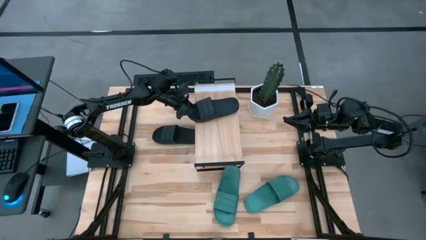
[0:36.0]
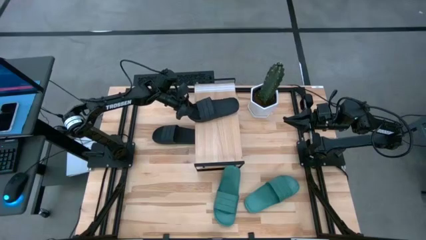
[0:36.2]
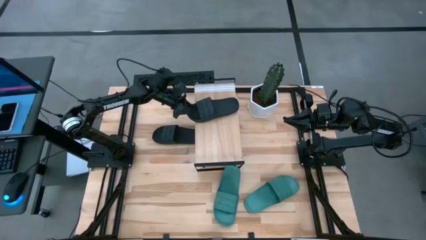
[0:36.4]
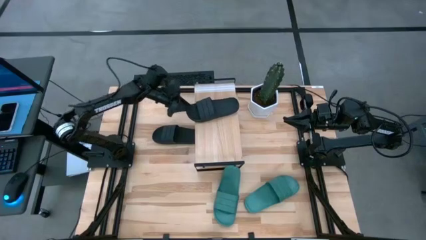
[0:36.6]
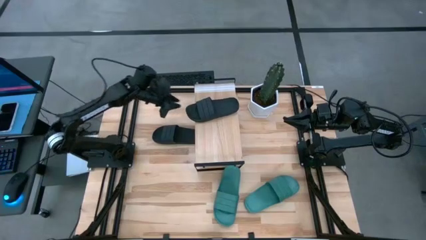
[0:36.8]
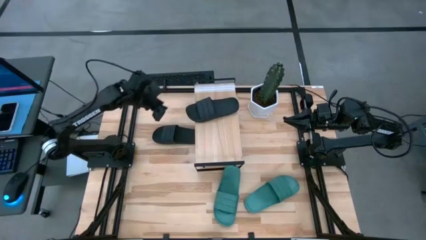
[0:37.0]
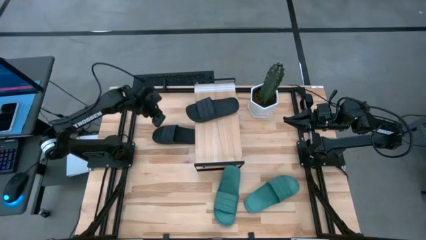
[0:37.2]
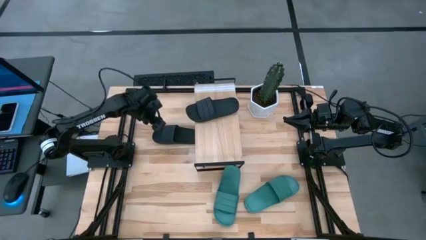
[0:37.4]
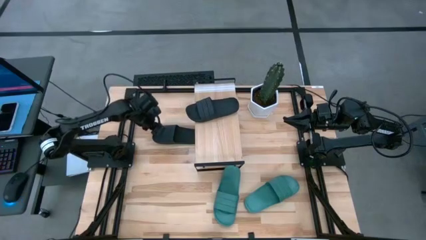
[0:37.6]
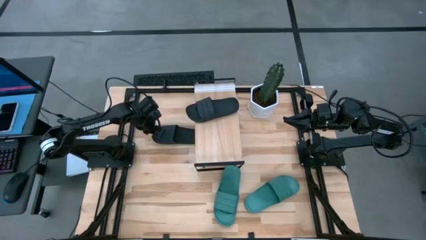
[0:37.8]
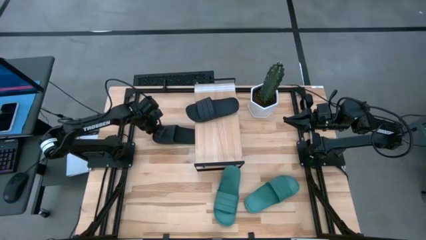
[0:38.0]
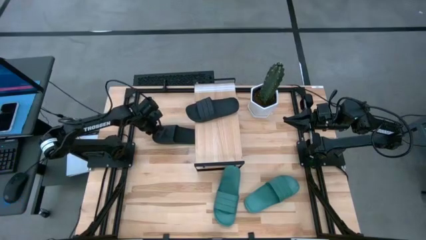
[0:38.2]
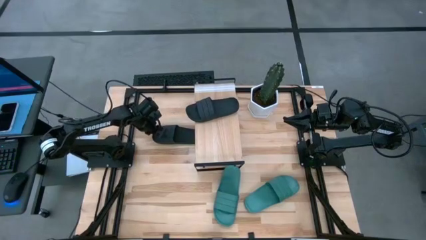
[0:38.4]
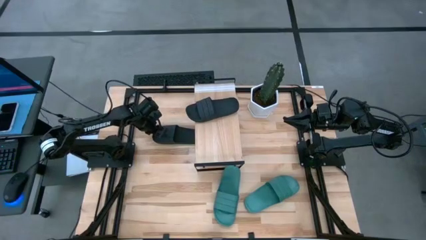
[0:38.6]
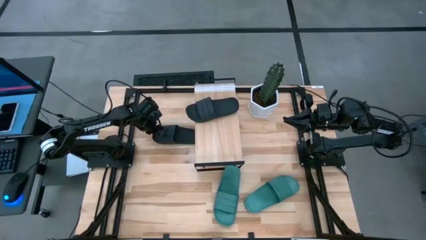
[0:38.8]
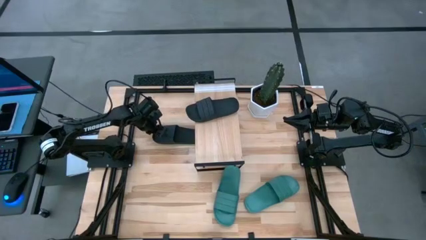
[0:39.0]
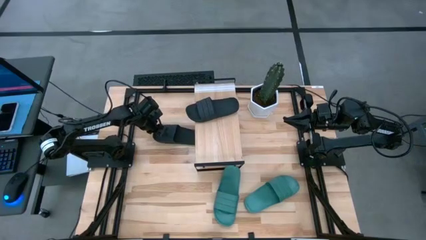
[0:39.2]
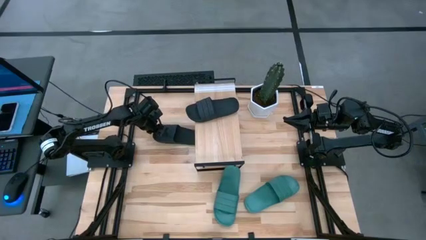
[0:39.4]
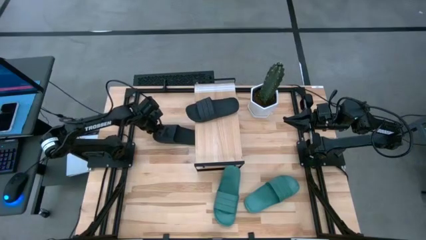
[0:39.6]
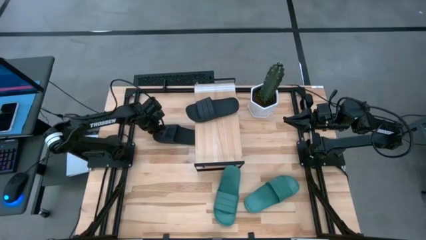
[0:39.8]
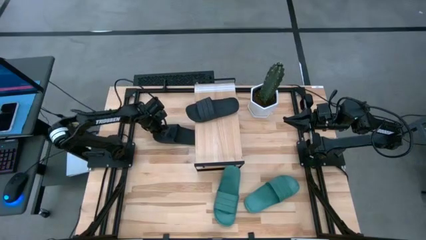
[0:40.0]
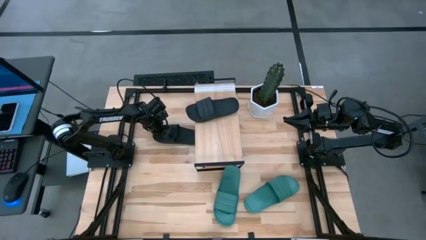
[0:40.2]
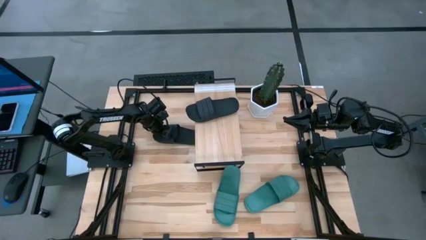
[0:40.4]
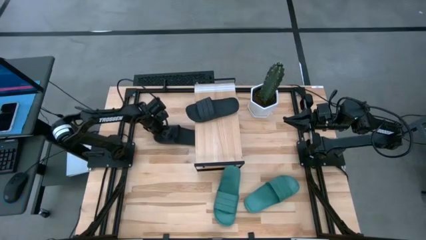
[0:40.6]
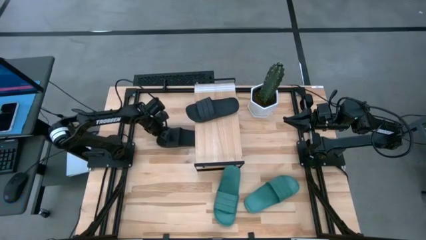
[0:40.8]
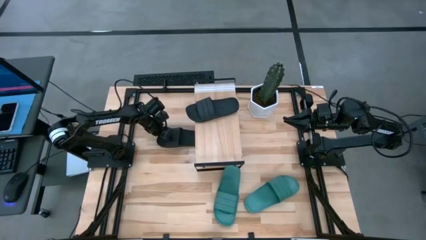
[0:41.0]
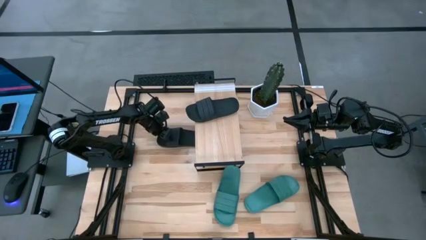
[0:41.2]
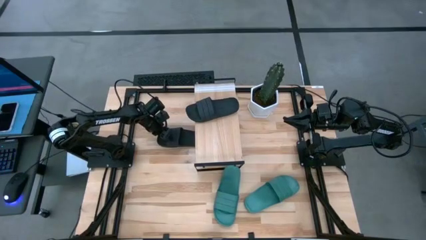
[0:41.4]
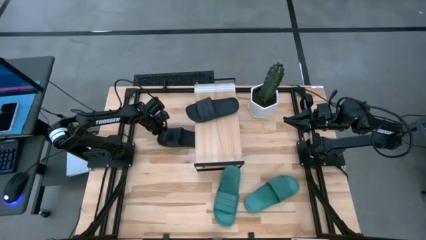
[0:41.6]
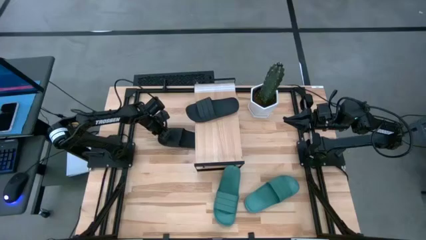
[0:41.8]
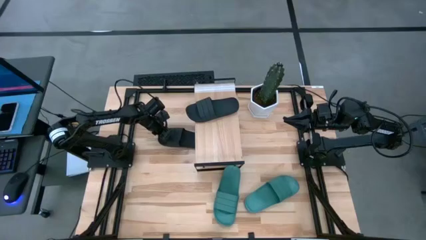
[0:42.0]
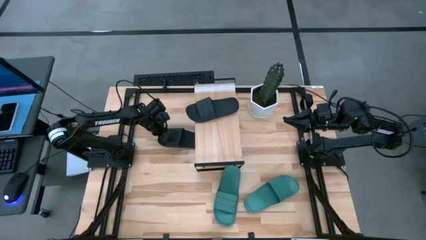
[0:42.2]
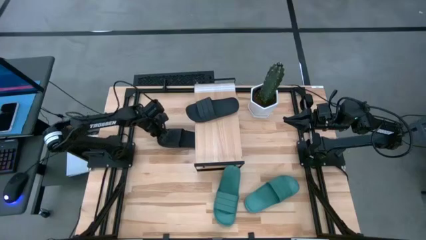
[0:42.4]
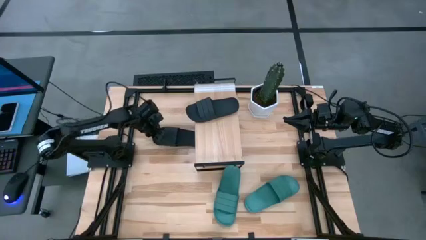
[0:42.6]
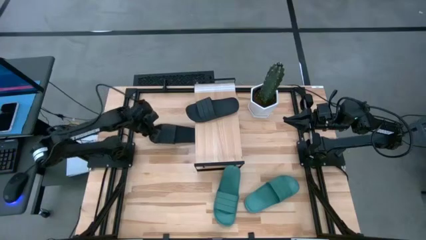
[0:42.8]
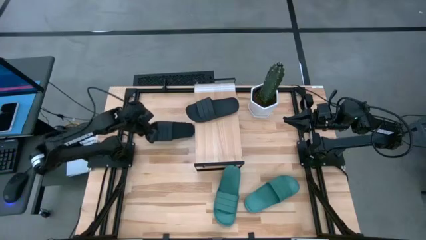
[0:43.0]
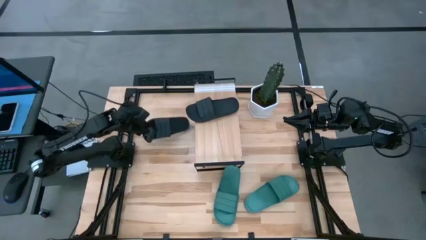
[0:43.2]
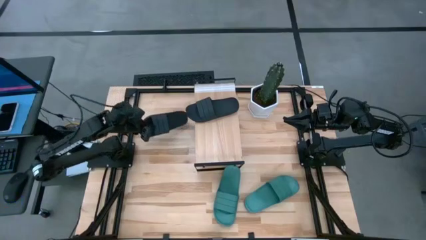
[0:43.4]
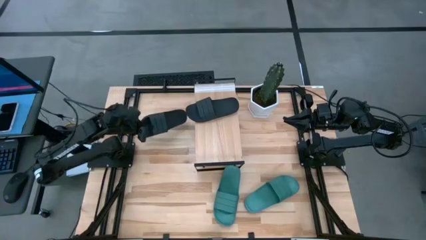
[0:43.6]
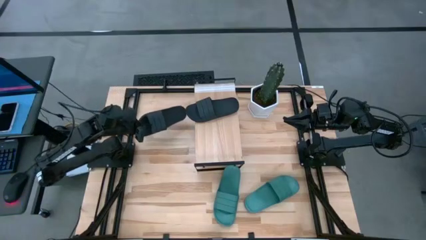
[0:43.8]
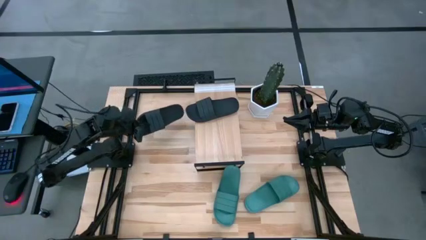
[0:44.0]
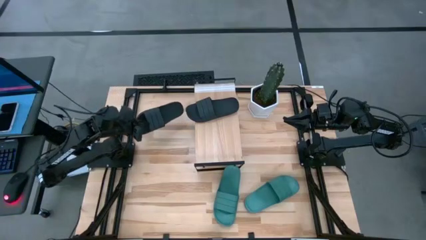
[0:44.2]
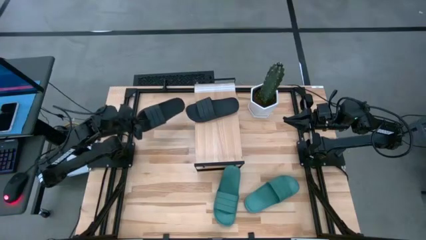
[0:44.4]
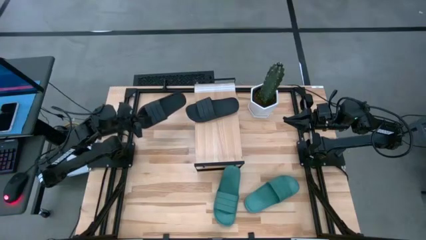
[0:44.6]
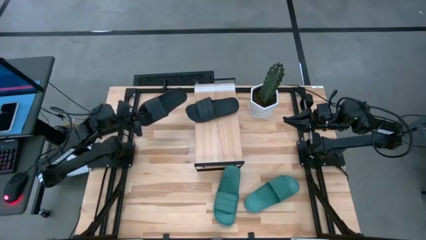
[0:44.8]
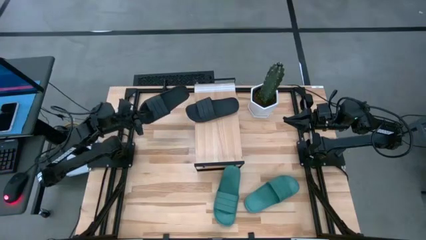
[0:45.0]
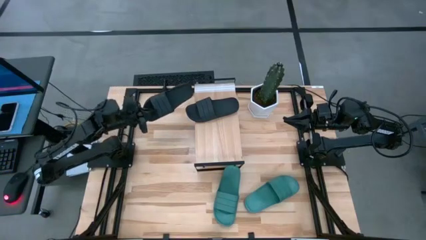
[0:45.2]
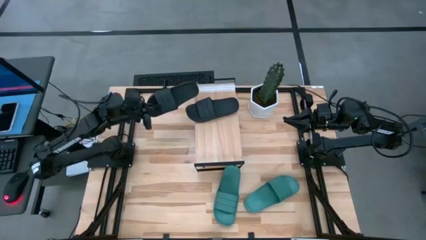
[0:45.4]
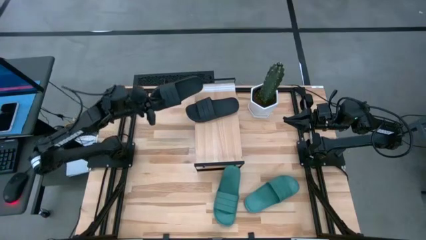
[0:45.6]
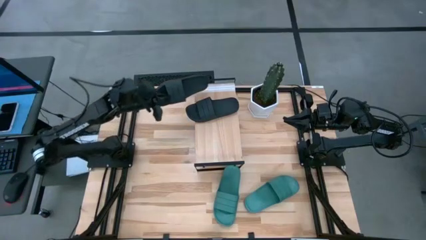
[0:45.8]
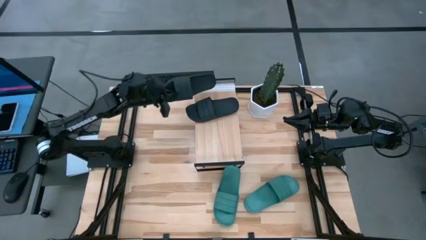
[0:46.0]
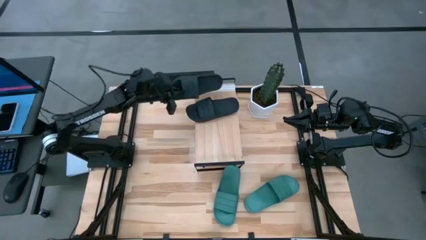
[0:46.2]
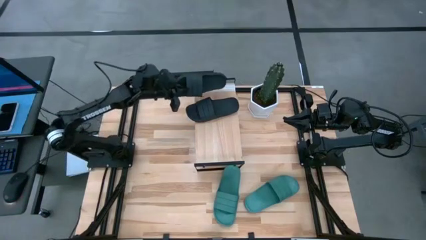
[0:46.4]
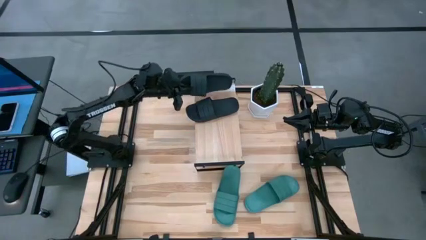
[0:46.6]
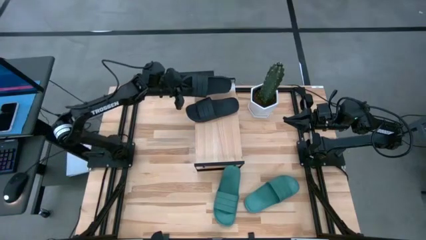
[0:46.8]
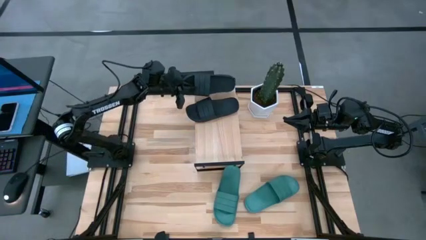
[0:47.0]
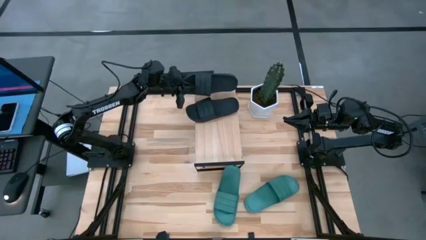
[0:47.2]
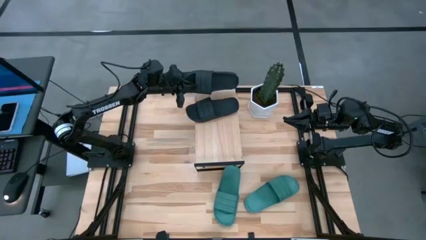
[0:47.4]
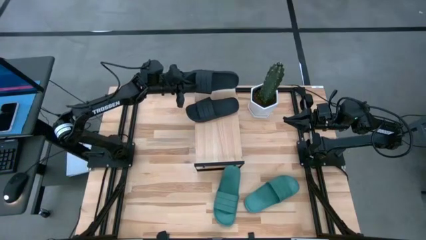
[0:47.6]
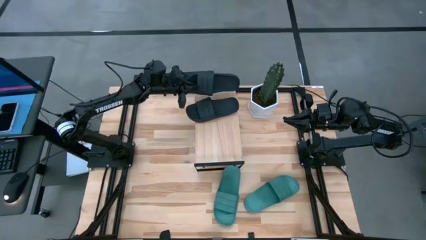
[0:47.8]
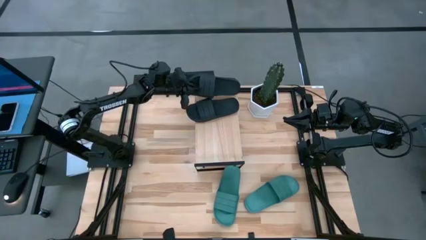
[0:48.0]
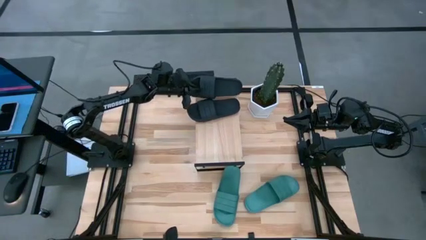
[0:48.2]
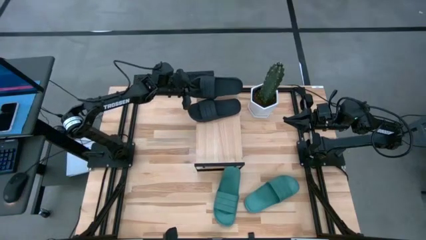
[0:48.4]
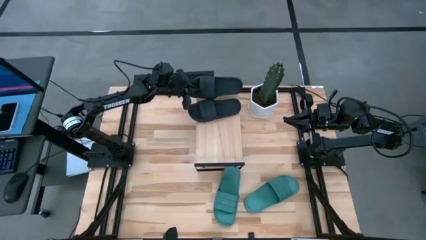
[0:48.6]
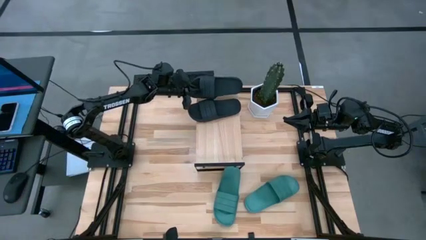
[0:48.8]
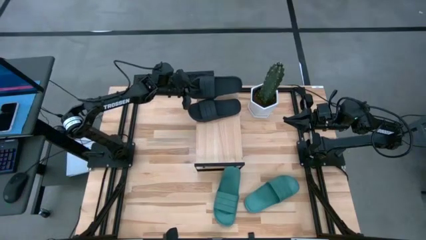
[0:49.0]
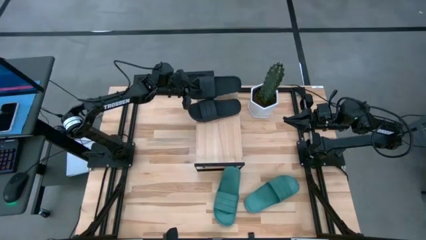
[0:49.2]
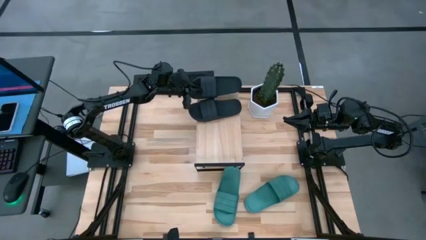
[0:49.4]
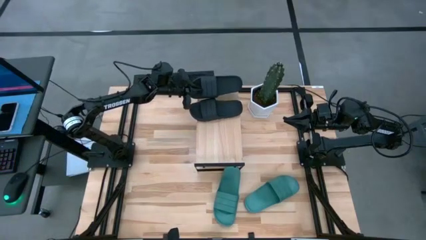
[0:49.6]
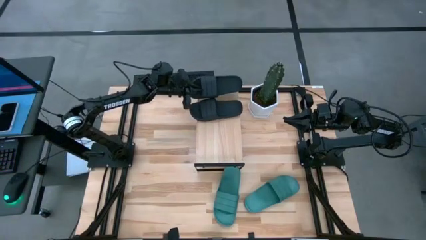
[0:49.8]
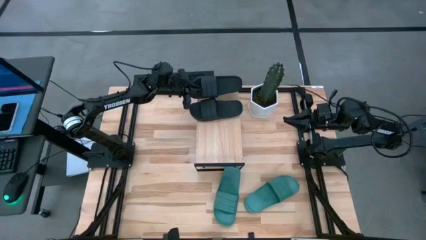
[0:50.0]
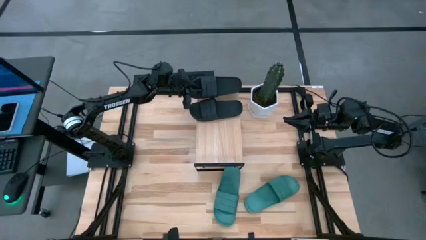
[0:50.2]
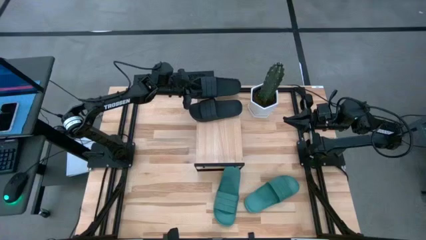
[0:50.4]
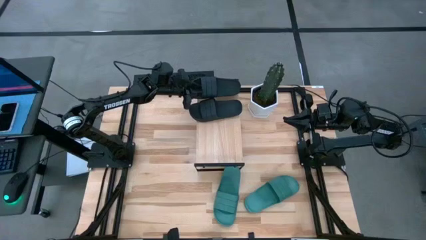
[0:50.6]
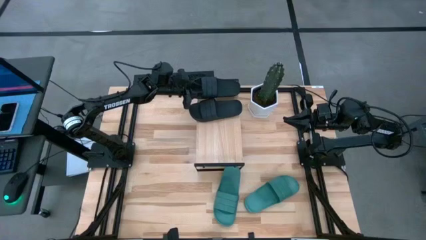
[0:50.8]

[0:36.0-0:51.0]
Task: Pick and place slides into the shelf
Put the black slipper on the shelf

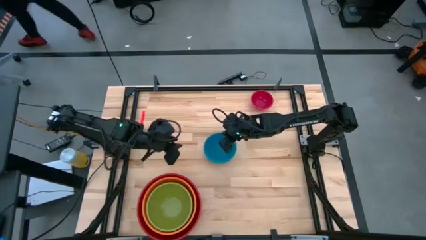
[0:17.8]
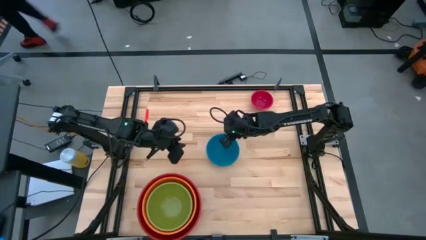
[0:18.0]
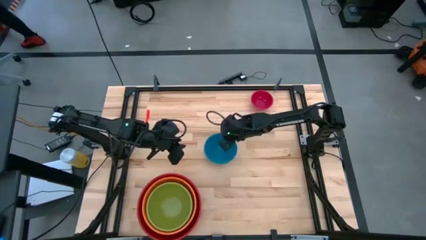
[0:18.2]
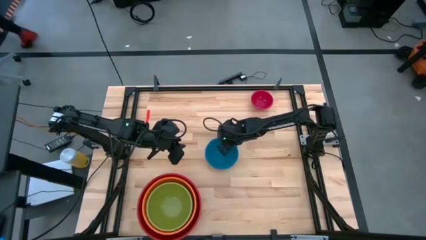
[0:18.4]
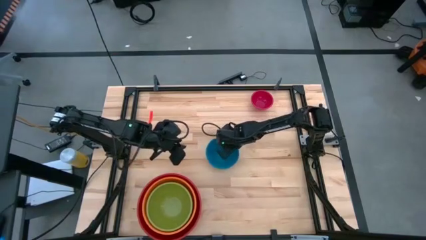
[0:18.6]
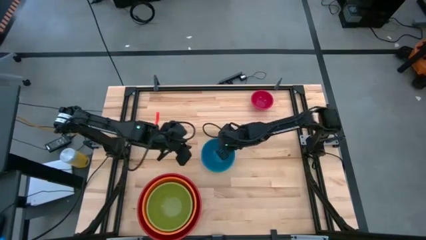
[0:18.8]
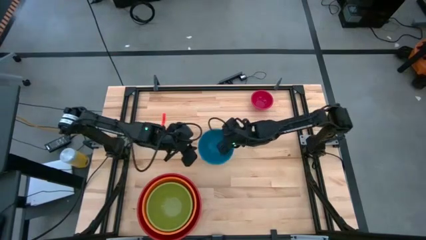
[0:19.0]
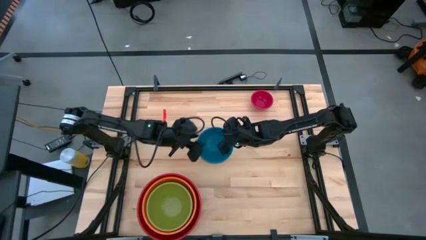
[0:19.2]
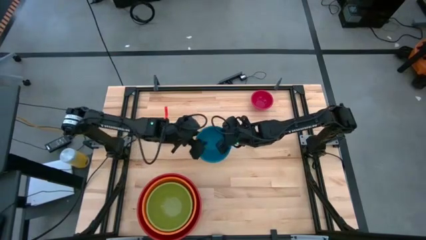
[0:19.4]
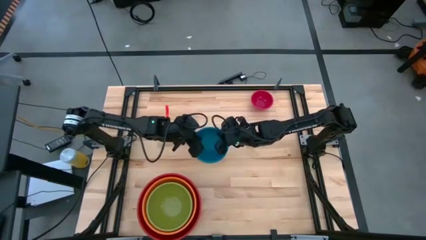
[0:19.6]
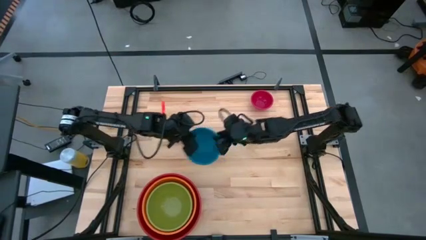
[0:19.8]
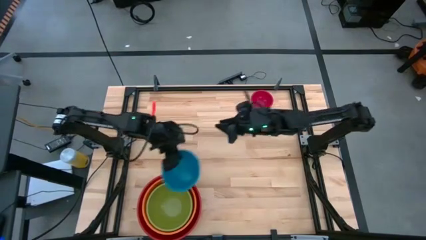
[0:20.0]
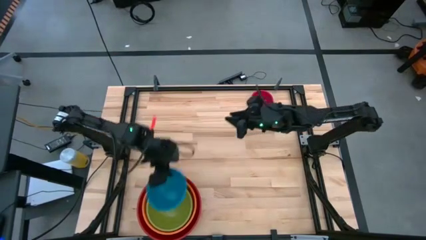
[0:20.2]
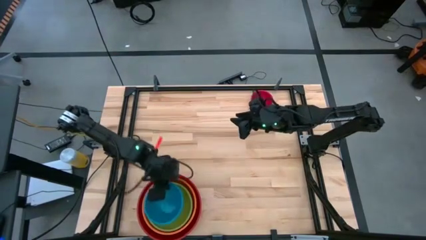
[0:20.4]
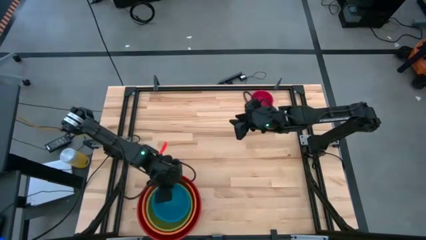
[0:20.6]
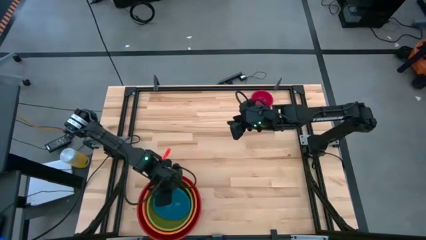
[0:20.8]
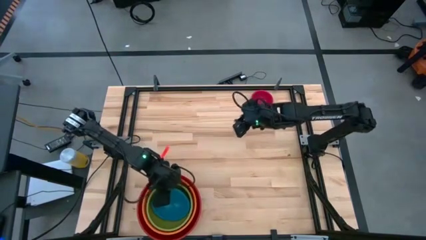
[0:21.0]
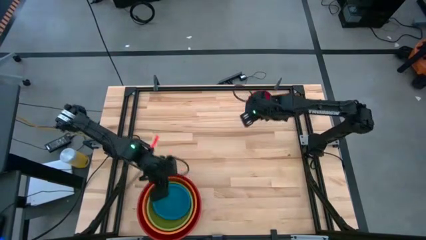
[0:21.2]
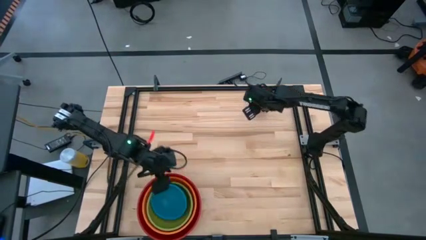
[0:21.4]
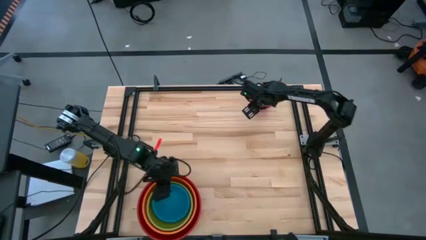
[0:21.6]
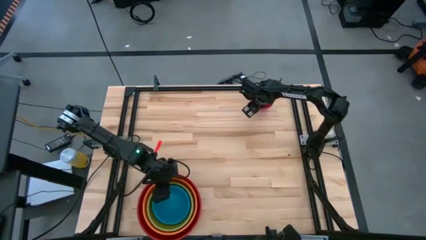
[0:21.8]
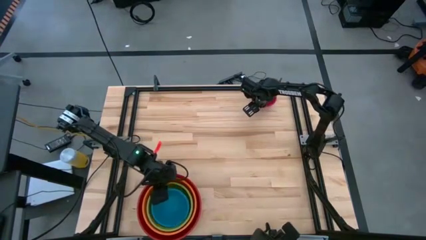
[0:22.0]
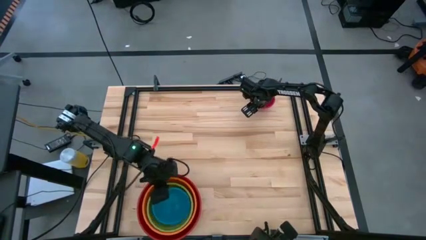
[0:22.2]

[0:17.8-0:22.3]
Task: Nest bowls inside each other by size order
Stack the blue bowl on top of the green bowl
